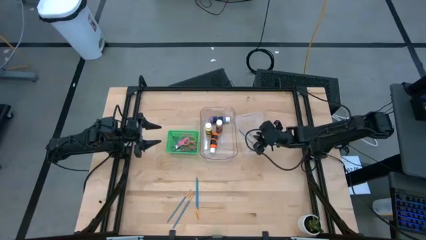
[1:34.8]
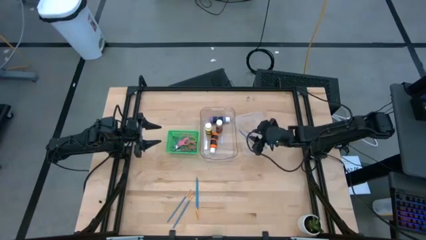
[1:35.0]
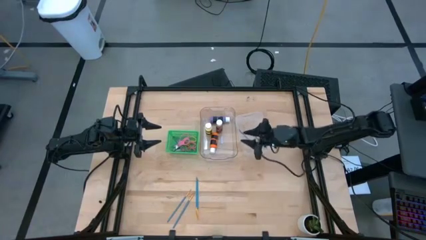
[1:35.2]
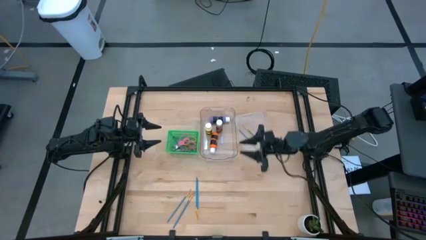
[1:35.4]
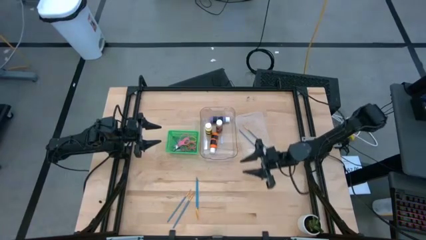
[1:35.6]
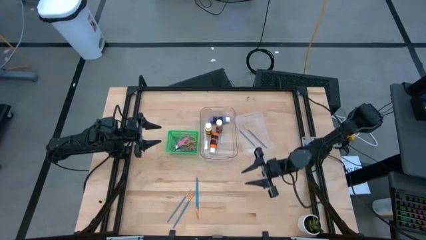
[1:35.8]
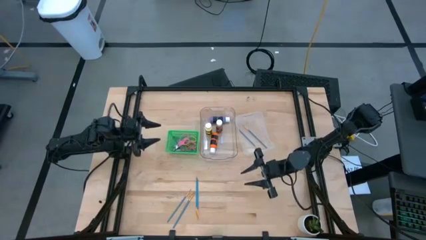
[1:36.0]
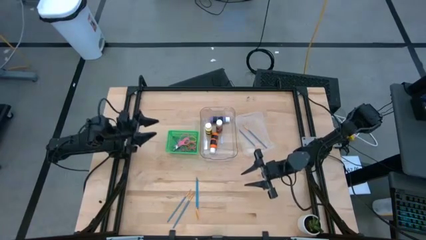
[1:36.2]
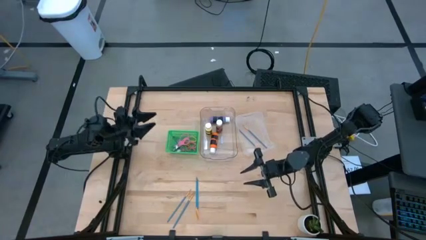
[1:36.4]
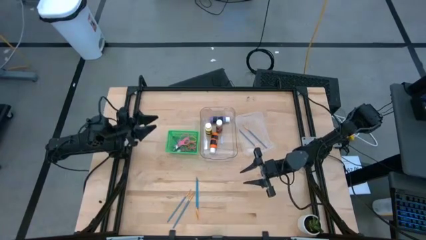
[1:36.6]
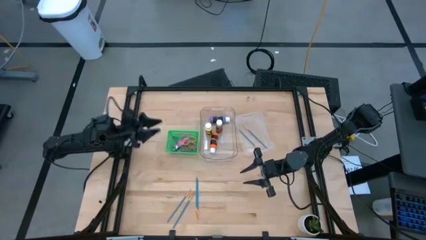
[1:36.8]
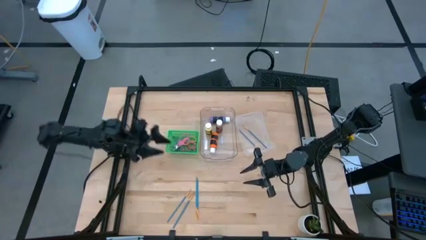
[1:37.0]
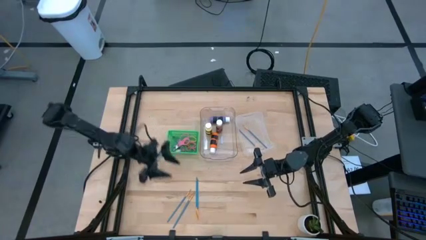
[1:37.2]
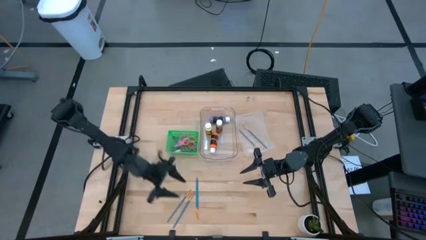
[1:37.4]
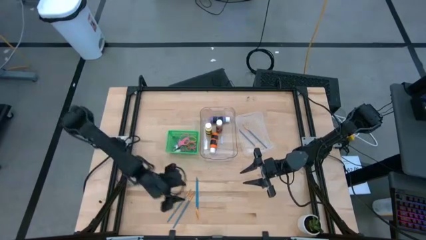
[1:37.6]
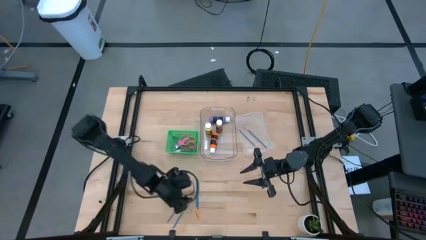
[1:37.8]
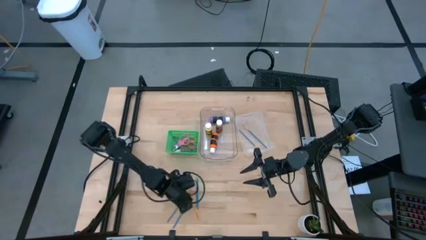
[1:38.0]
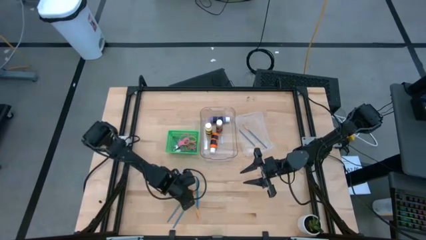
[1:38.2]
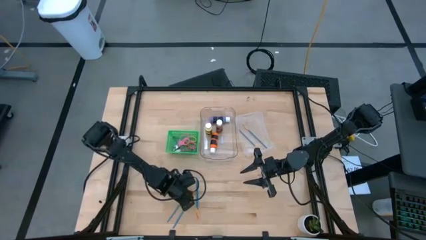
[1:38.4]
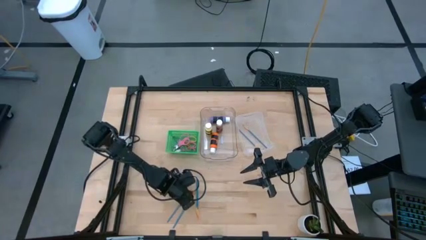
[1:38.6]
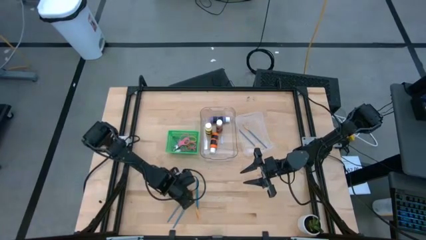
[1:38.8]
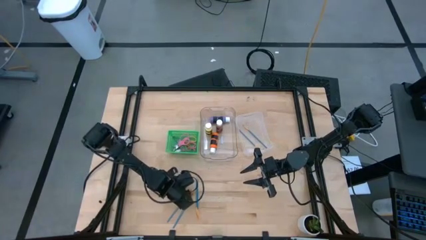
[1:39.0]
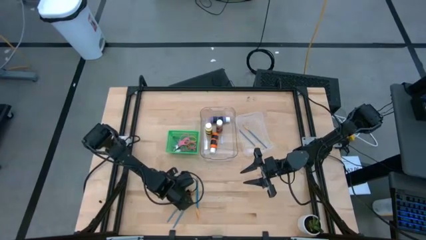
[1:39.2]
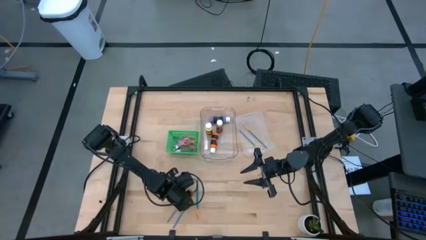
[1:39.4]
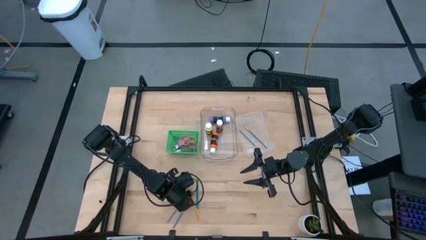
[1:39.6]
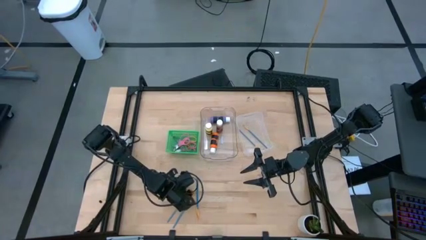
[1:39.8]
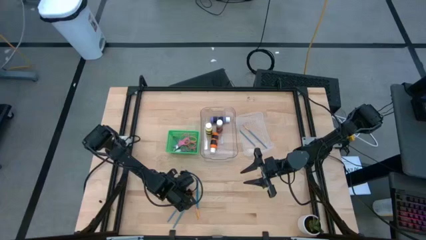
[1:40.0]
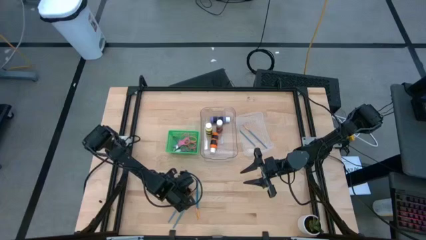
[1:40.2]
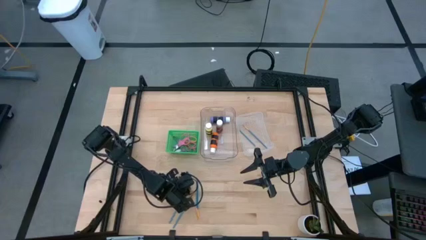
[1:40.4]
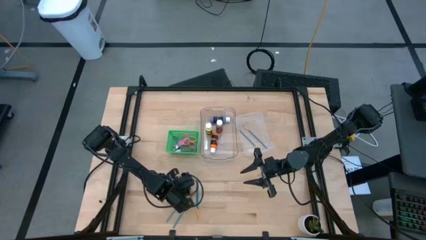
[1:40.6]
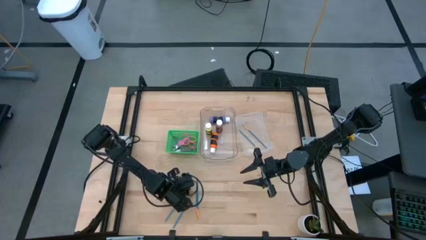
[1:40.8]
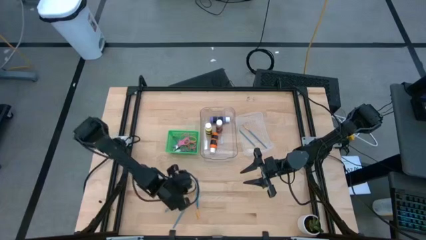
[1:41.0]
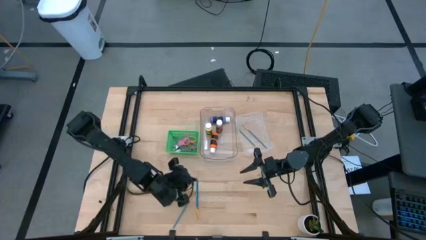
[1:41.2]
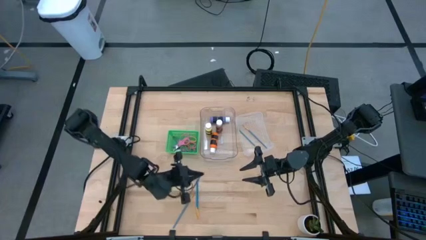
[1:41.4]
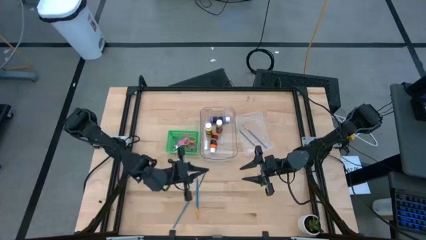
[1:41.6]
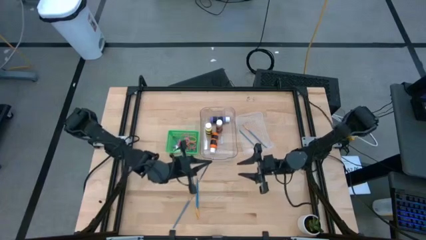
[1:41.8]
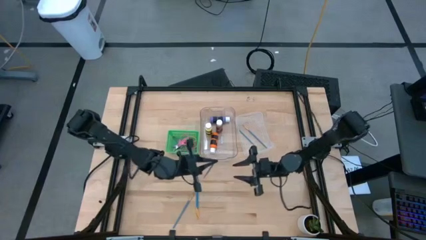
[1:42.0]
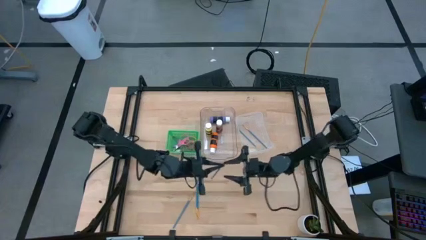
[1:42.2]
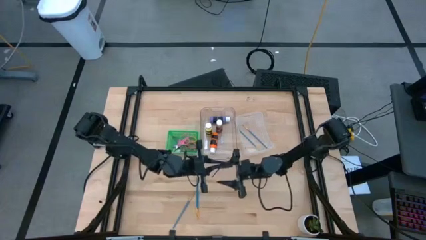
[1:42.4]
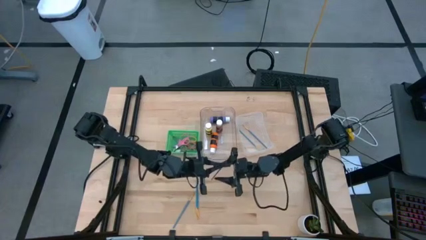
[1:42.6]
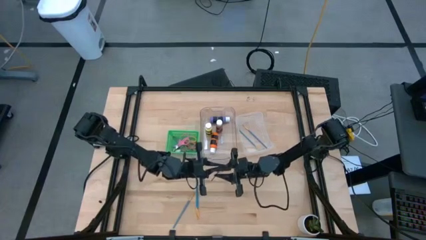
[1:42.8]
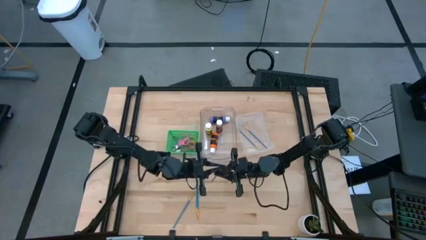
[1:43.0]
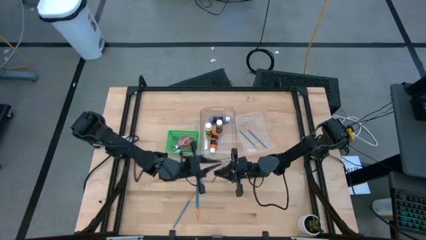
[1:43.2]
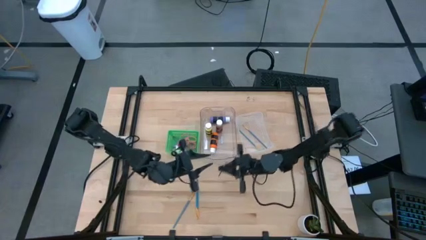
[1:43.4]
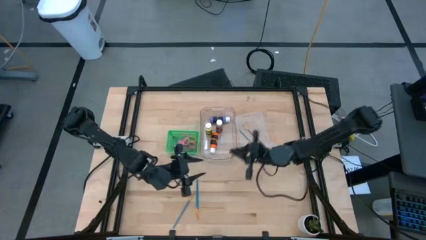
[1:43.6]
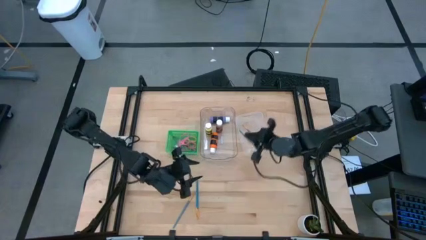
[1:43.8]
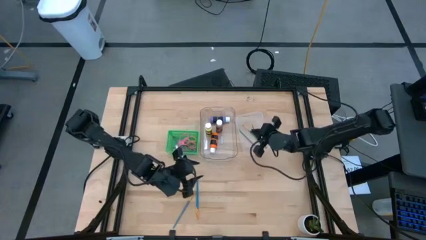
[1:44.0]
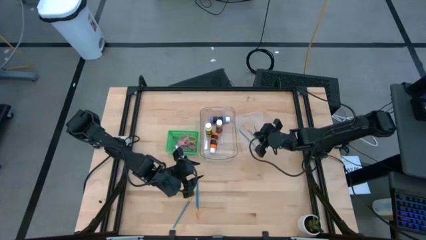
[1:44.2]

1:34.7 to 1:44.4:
Task: Pick & Place Paint Supplies
Put the blue paint brush into the white bin

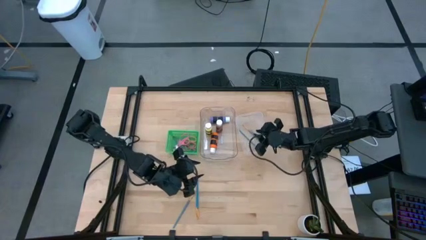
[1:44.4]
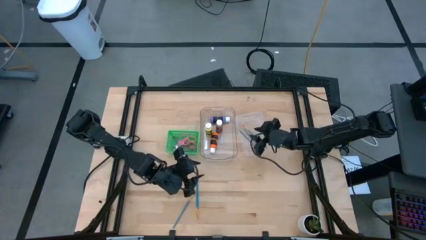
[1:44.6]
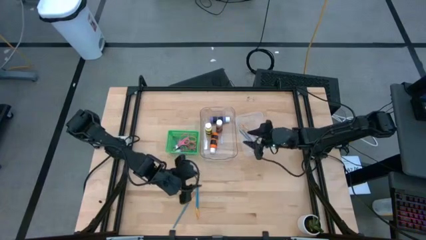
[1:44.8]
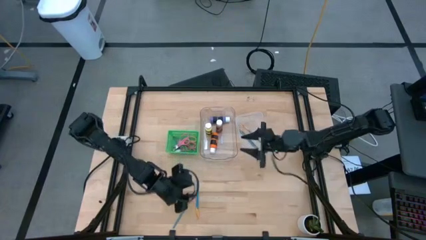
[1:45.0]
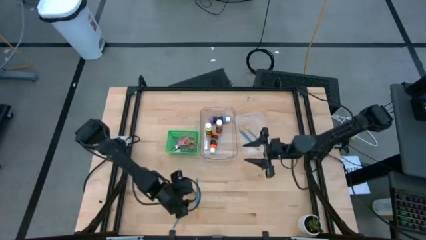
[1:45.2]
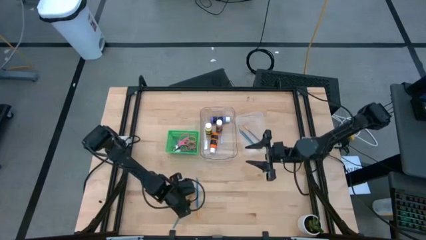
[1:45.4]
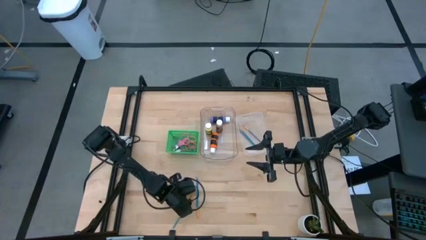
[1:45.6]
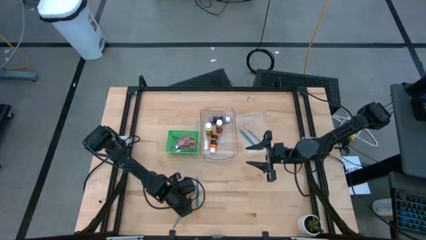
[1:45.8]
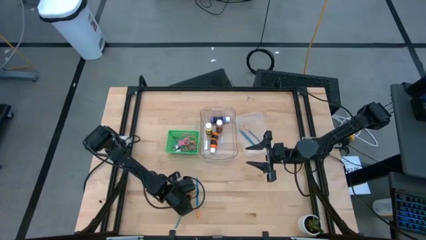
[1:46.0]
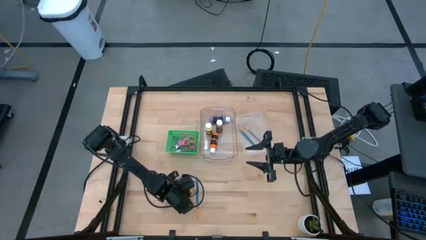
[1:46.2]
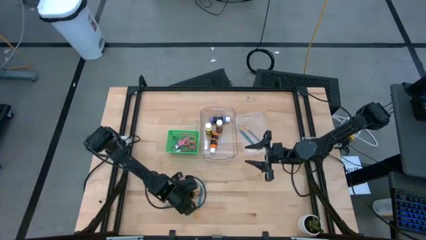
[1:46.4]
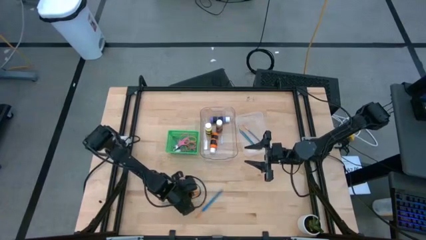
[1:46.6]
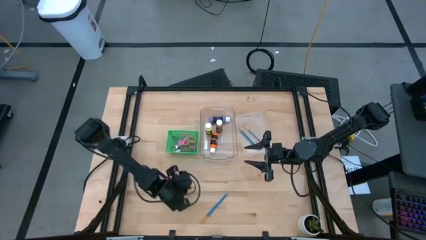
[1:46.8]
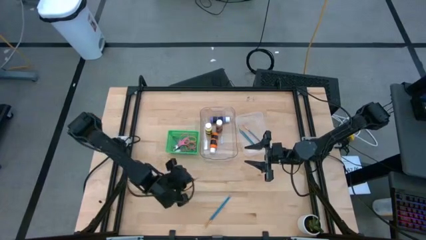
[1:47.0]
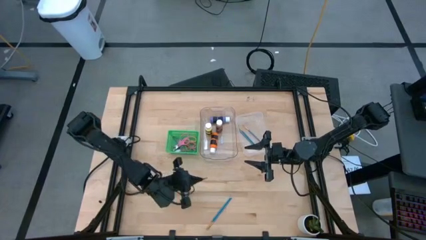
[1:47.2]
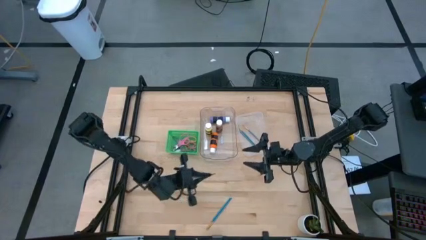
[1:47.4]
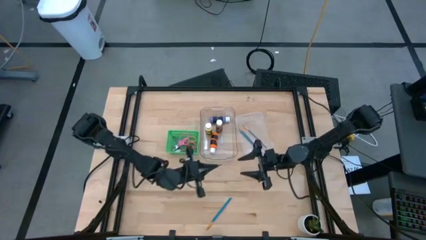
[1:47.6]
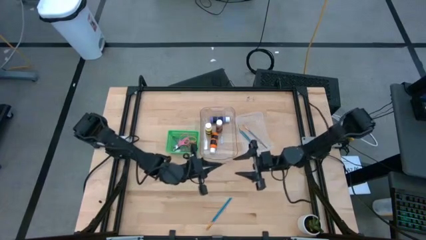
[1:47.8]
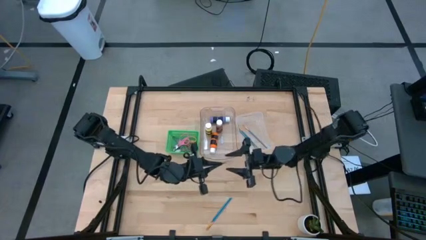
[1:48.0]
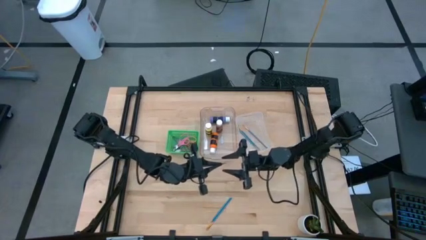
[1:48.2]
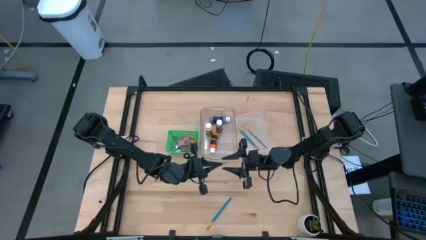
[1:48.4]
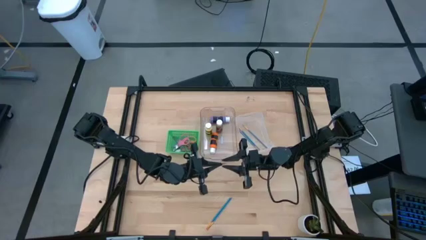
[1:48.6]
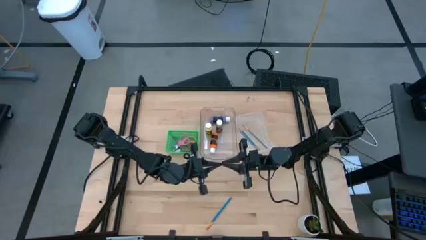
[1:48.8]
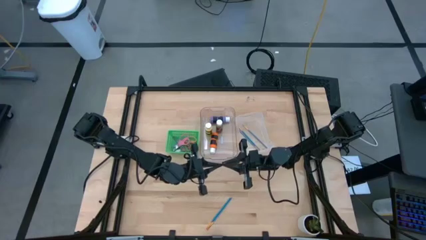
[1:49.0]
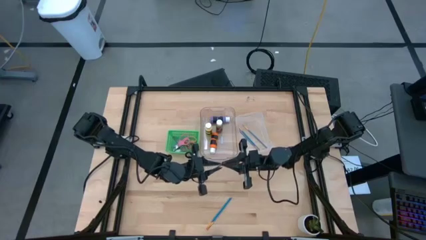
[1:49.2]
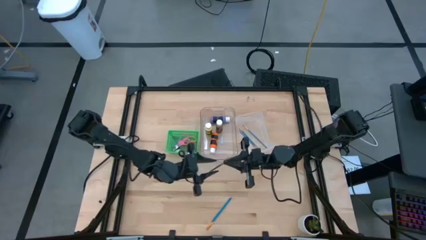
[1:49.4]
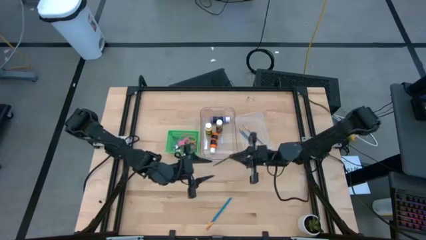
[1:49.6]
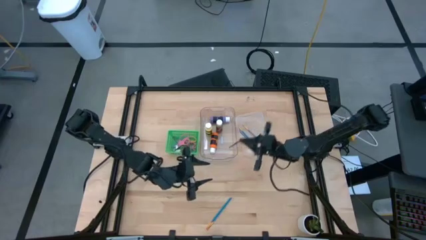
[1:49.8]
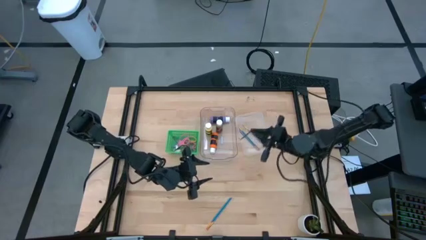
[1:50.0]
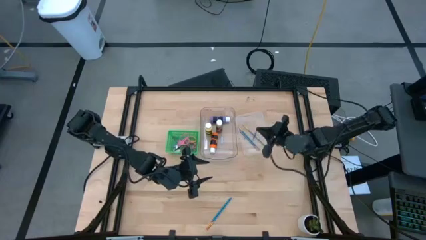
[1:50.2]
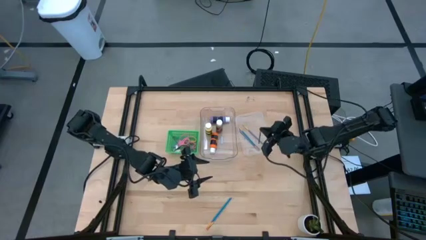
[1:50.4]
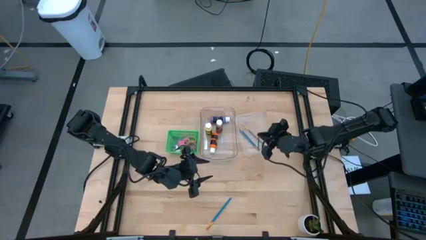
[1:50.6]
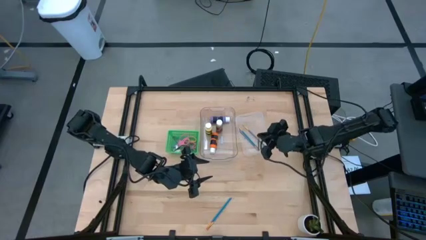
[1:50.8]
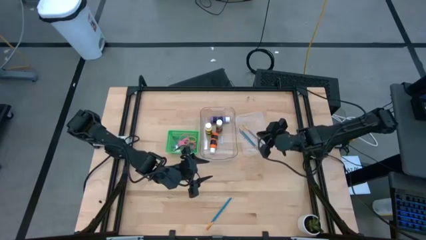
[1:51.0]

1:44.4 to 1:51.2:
Put the blue paint brush into the white bin

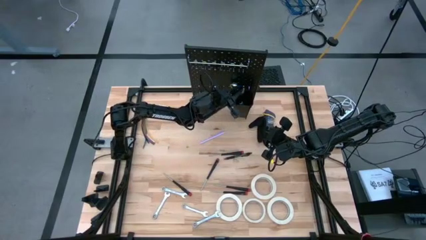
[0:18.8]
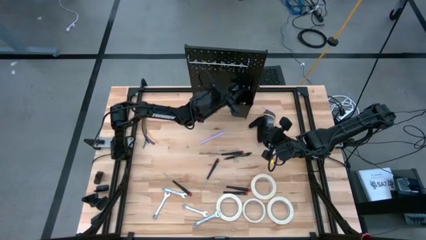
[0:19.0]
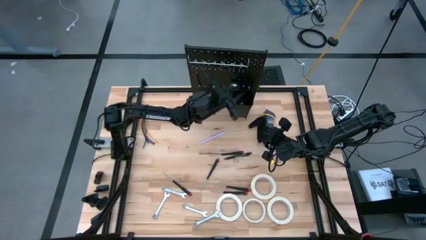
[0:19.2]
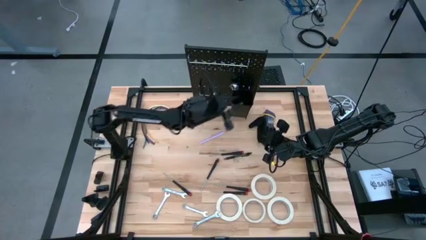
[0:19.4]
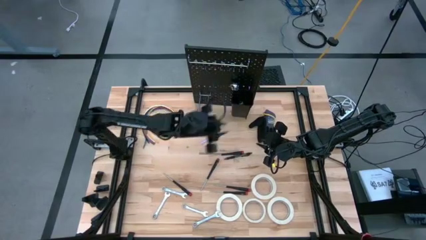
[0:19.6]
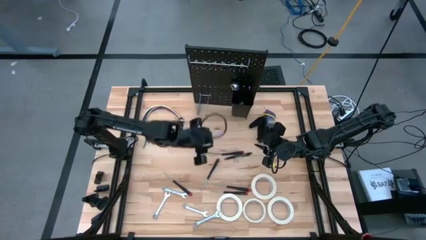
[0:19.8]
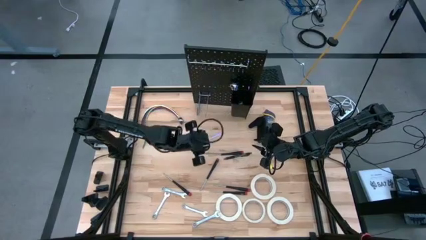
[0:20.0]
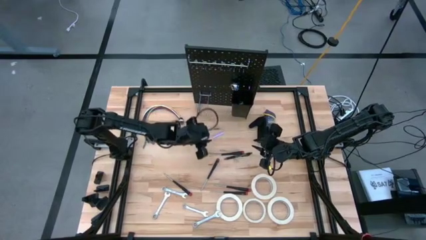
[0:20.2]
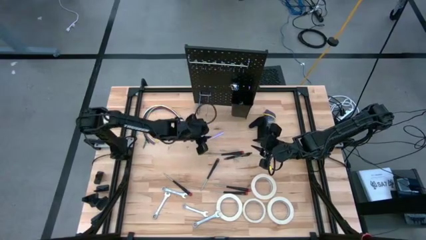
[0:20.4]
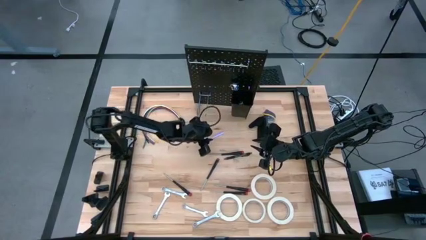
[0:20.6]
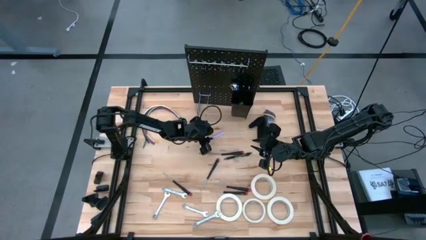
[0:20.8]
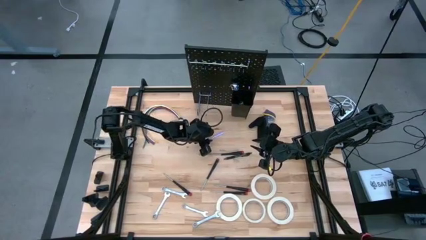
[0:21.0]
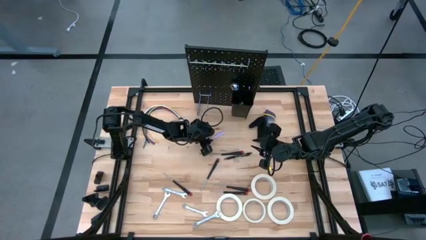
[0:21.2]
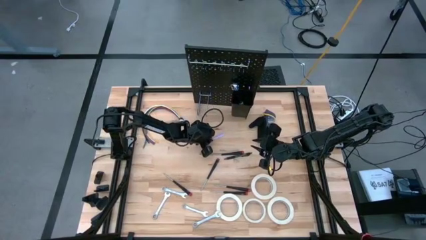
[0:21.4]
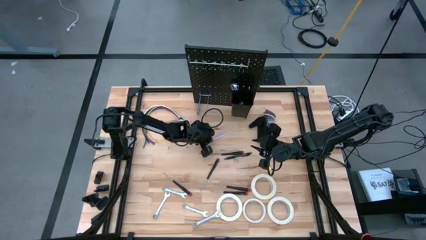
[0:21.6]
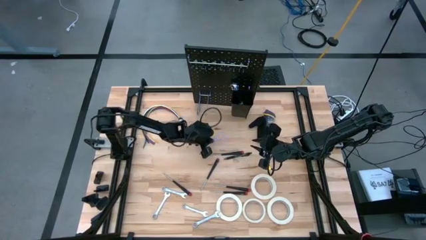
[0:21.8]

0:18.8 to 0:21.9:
Task: Hang tools onto peg board
Put the purple pen into the black bin on the peg board
